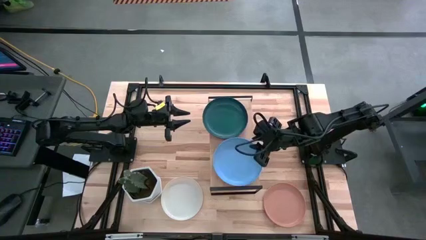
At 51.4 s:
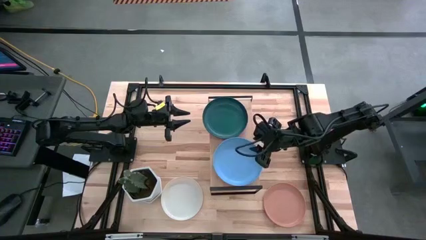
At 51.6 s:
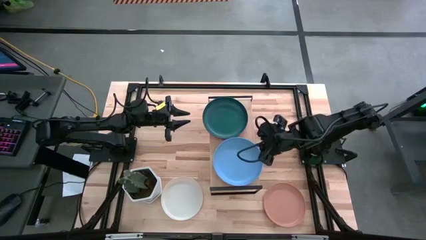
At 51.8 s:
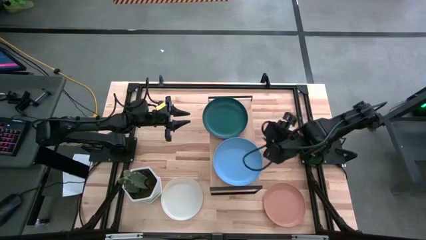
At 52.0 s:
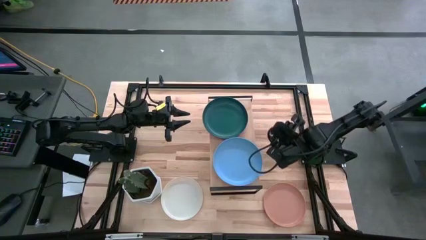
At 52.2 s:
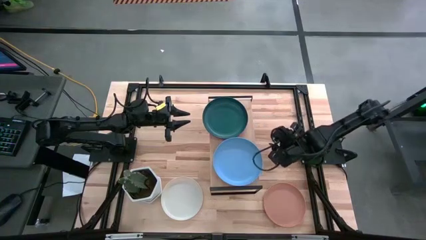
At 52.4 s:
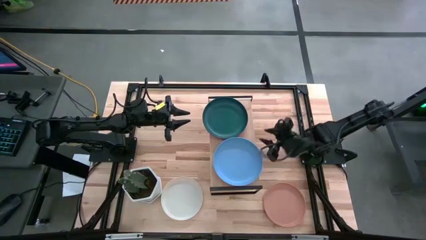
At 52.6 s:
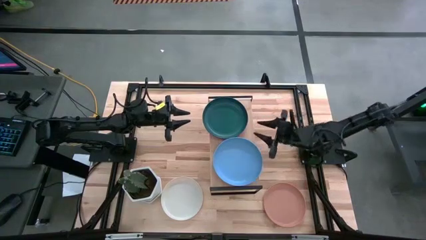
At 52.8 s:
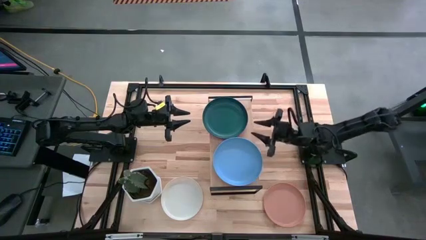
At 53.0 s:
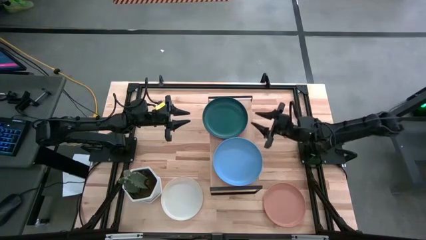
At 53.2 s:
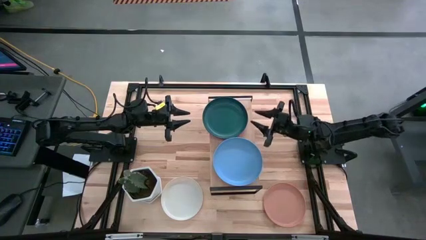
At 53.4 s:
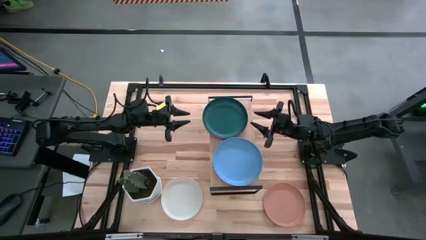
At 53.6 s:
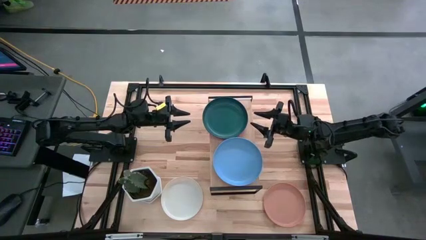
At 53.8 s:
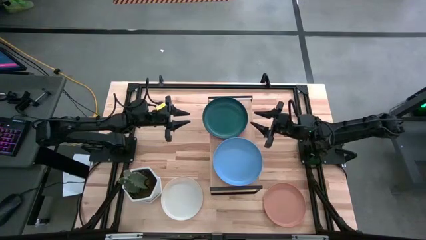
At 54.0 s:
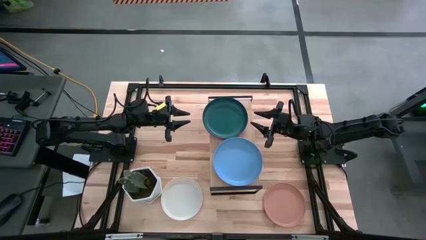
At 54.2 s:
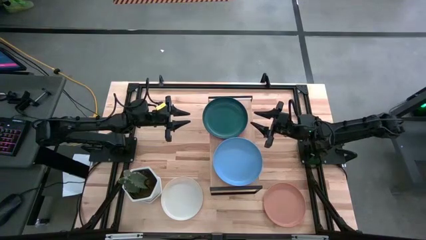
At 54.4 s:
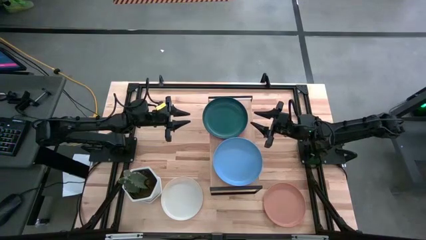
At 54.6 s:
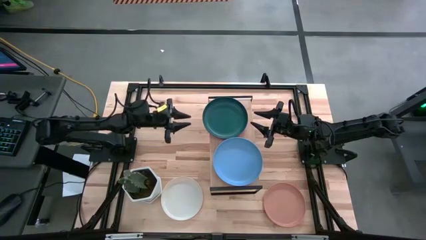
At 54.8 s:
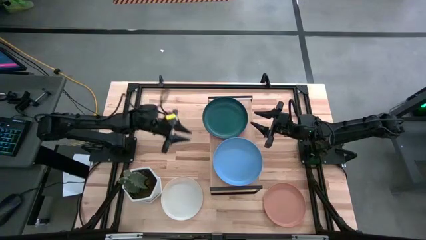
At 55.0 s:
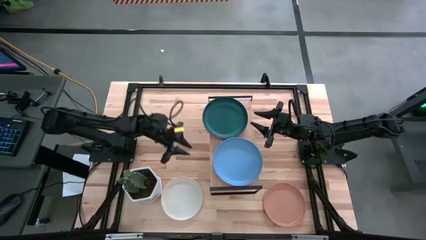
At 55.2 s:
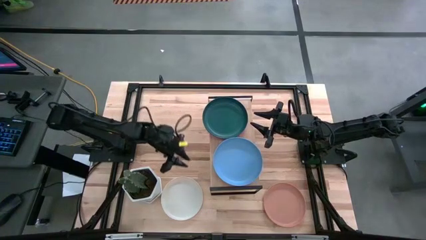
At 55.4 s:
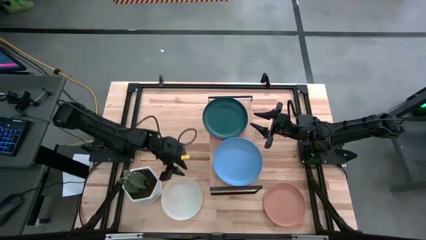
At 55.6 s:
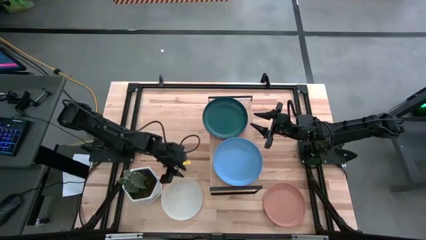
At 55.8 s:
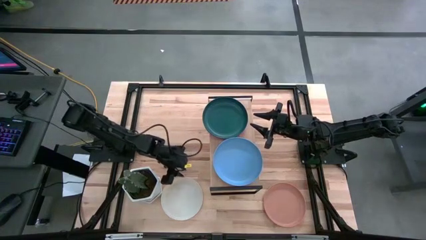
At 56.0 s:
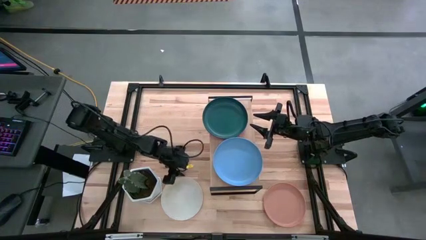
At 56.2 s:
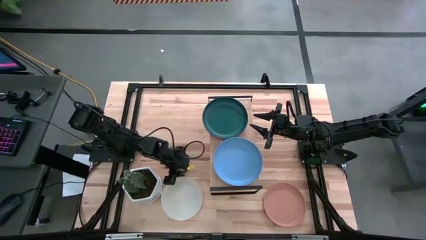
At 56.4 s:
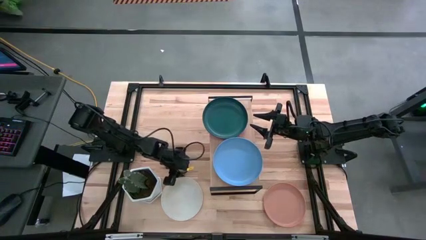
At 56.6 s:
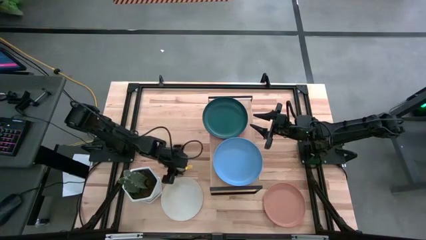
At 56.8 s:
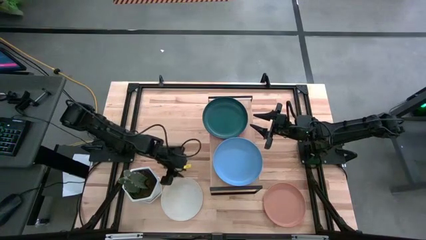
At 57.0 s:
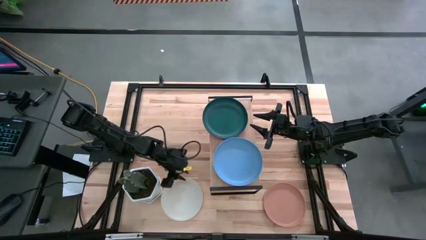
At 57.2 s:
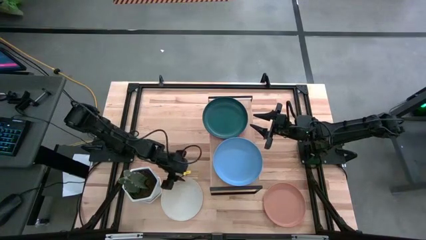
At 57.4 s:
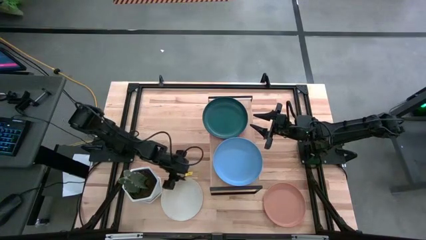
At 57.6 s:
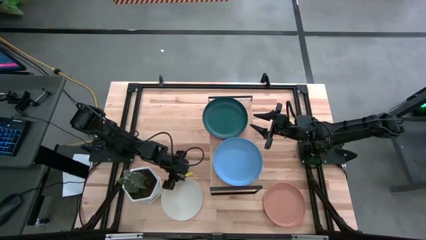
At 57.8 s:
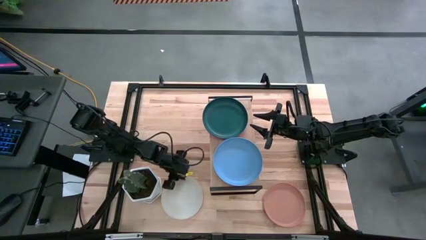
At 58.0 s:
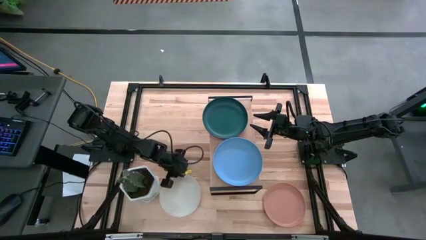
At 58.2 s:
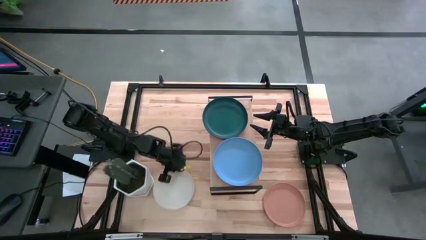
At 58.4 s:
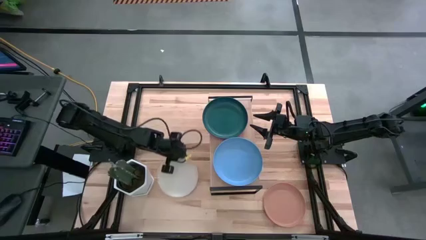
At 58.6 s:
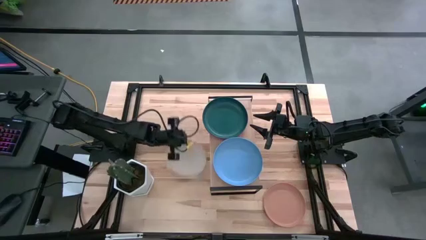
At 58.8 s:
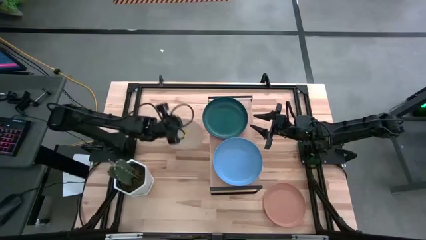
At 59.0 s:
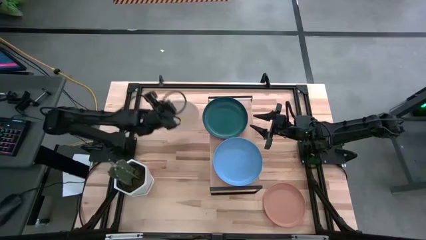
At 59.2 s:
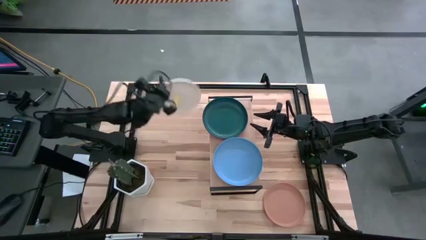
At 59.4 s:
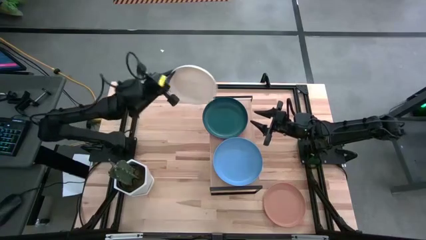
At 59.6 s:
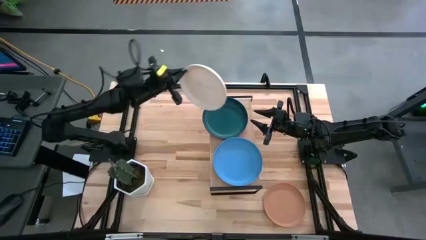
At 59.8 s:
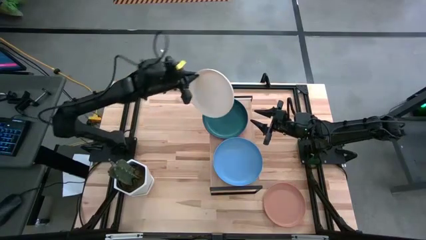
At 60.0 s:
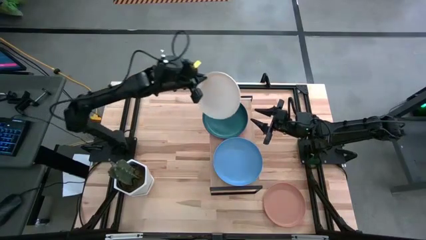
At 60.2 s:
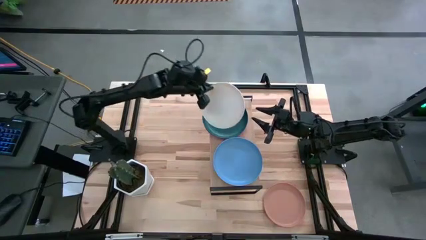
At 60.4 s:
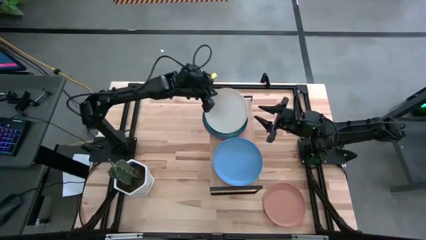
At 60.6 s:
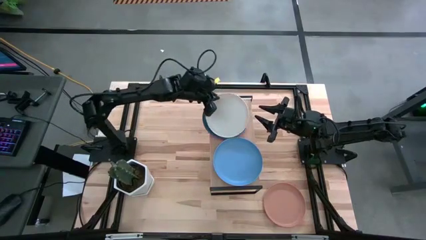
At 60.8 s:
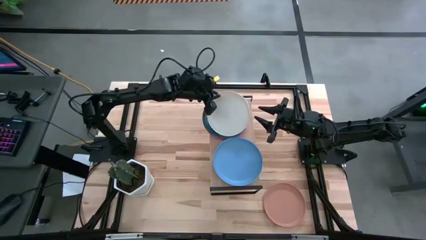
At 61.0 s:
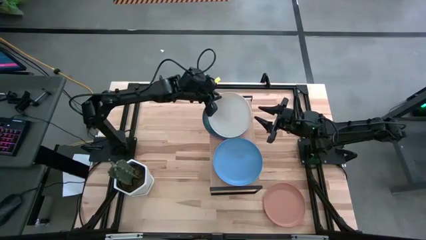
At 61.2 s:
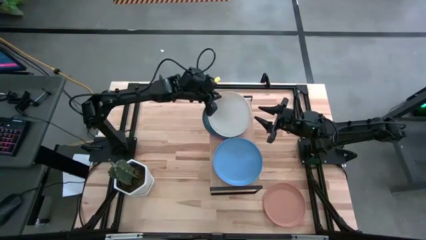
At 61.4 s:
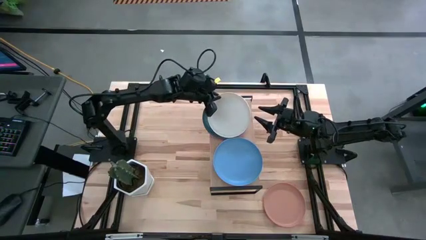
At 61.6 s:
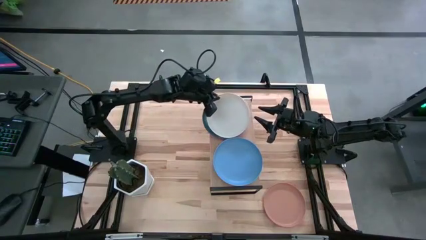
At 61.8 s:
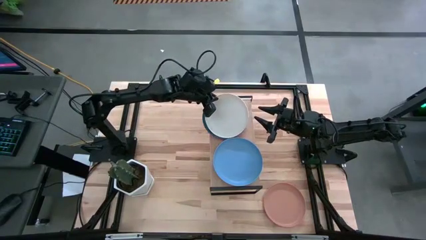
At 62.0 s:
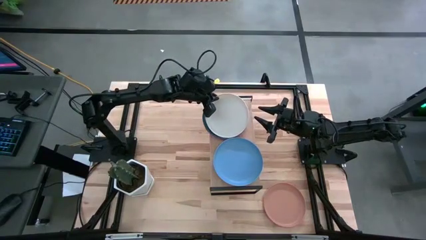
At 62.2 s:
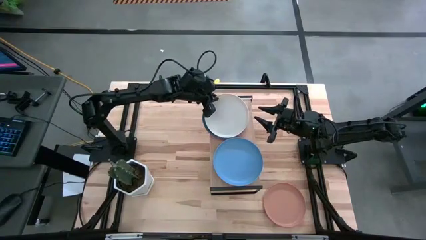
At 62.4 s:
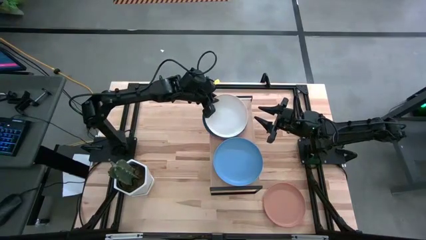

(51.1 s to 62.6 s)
Task: Place and stack plates onto a shelf
Stack the white plate on top of the green plate

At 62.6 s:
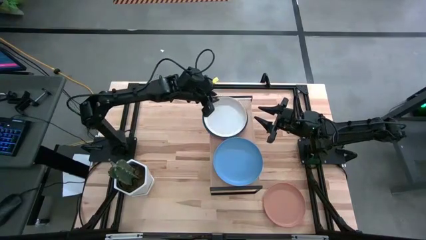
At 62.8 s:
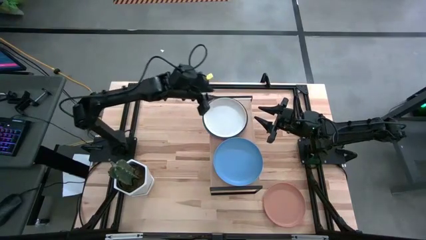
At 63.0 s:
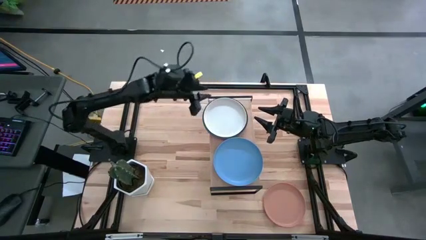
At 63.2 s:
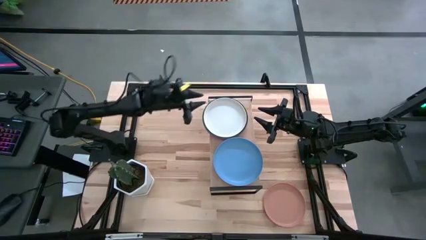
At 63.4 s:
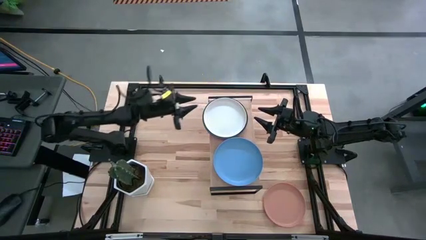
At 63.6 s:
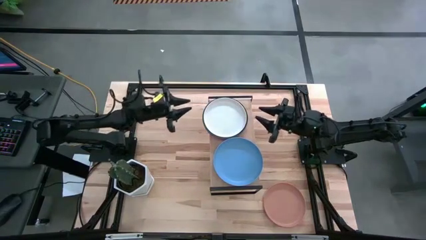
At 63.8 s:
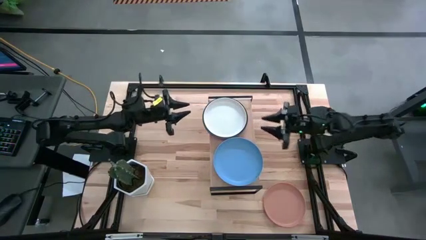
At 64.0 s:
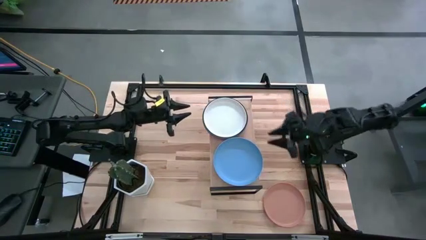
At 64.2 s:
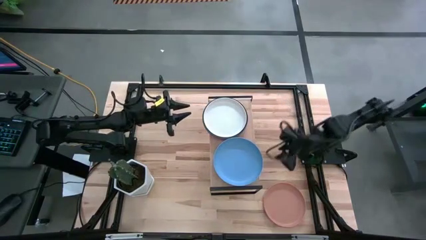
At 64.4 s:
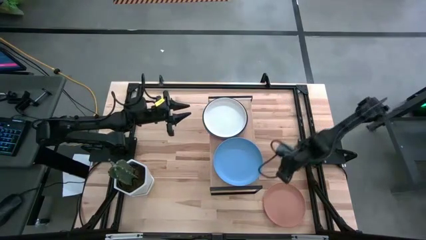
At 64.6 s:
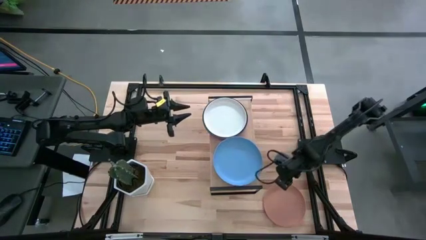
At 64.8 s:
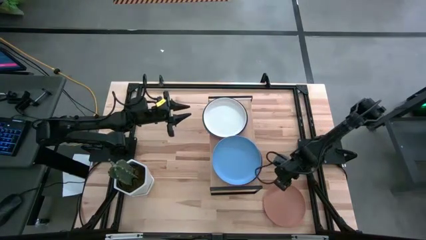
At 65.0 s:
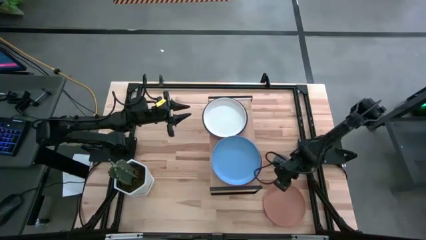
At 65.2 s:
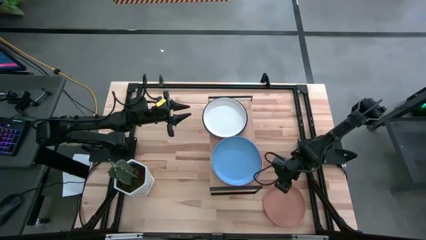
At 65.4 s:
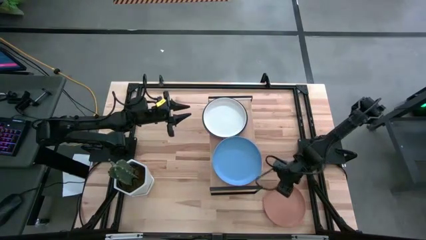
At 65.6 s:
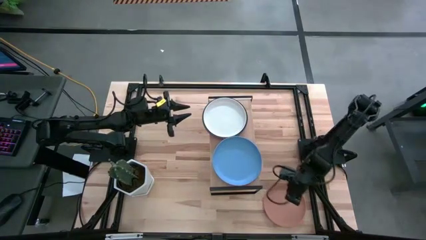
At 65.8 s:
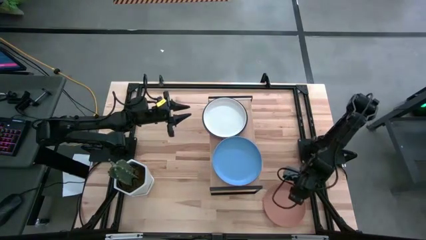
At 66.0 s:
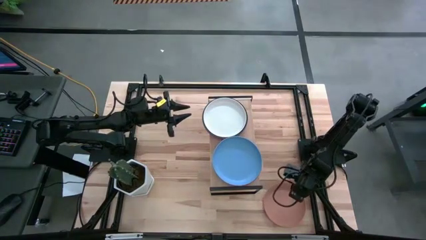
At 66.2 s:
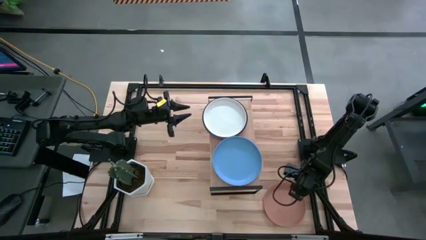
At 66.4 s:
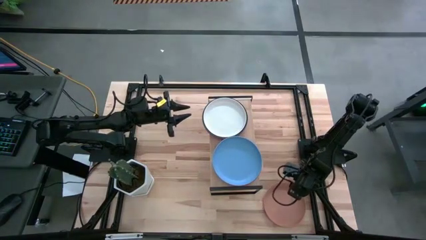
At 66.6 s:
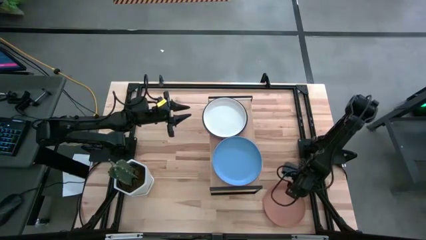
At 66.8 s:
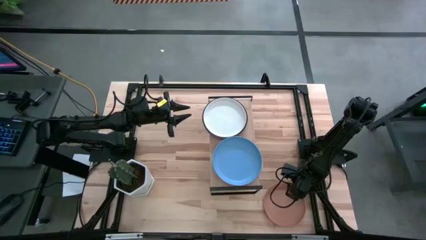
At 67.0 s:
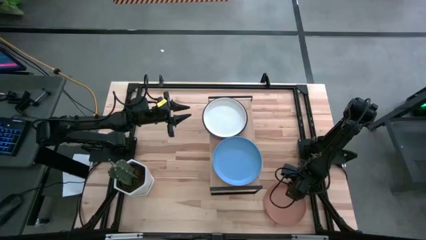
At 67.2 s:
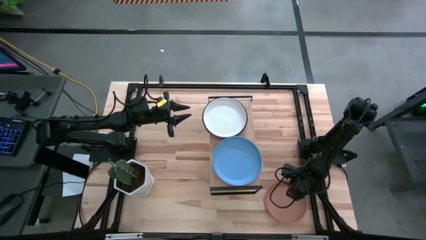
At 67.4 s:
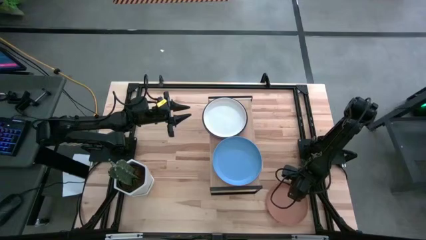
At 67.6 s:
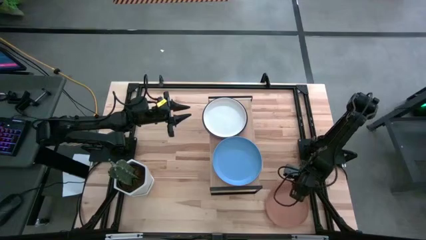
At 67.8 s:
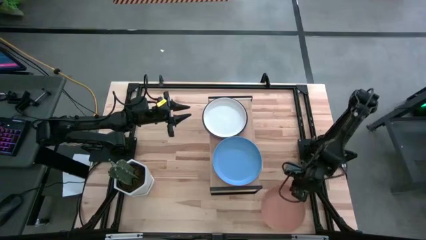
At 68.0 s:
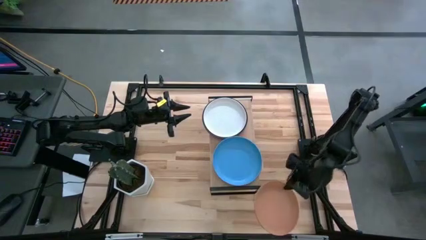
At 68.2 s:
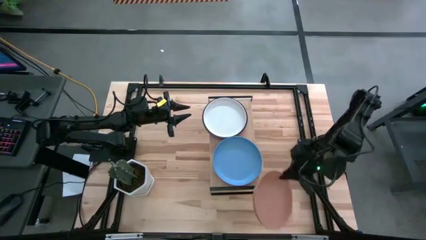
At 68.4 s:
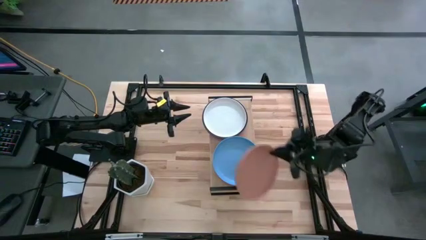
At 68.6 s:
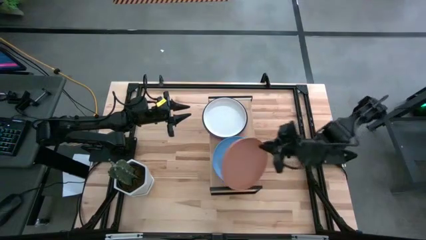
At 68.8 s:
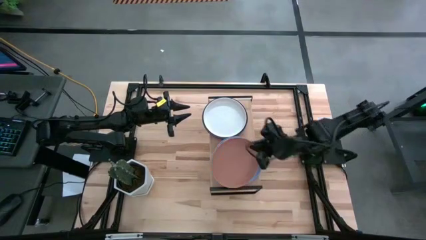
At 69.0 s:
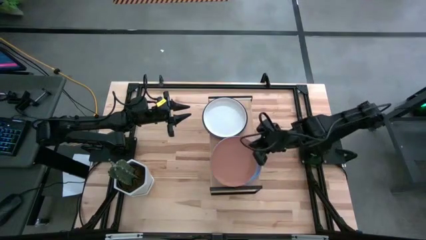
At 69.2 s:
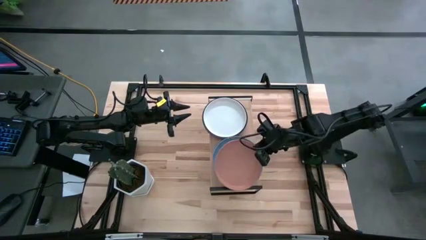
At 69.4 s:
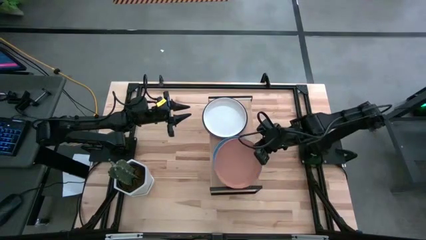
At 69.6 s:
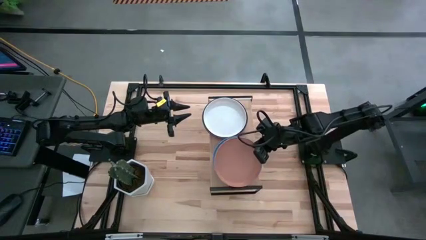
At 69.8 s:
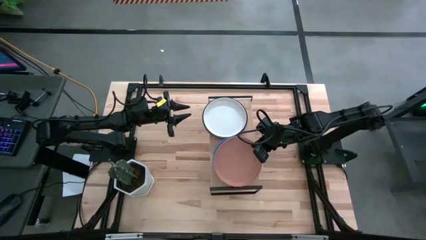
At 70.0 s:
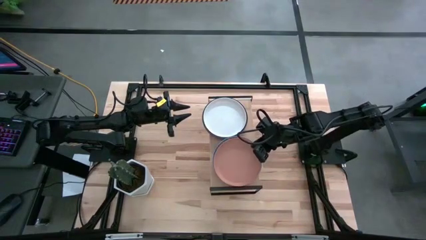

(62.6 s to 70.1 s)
Stack the light orange plate on top of the blue plate
